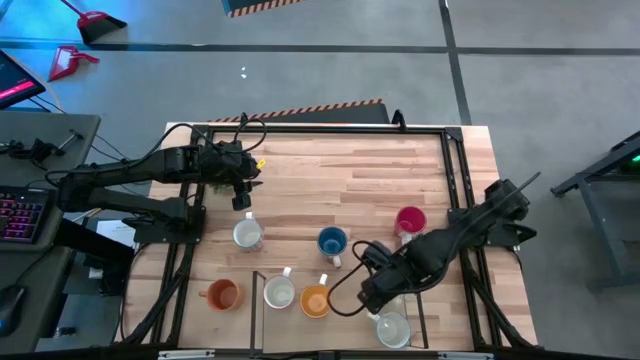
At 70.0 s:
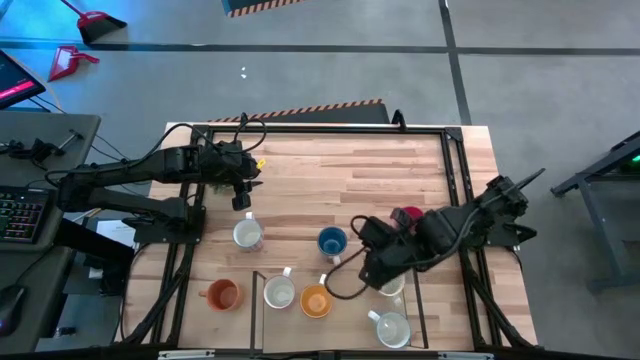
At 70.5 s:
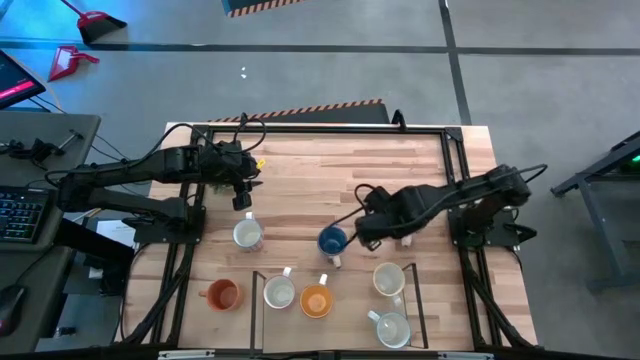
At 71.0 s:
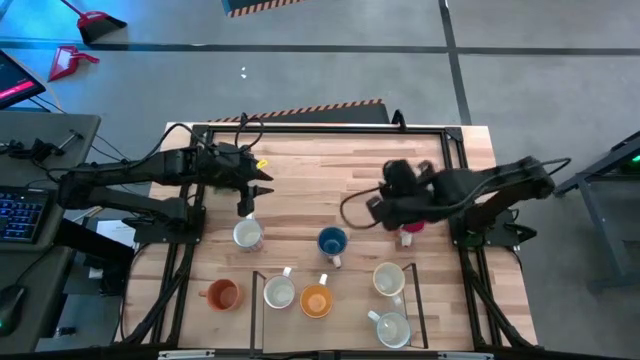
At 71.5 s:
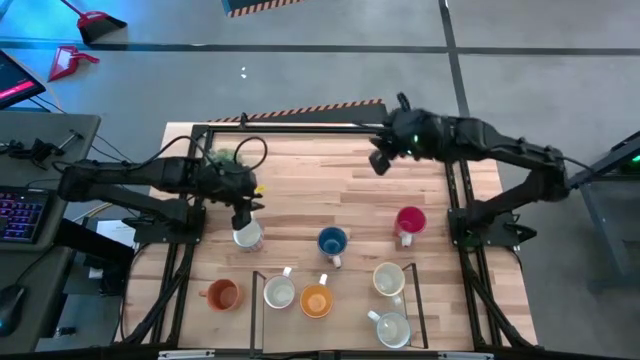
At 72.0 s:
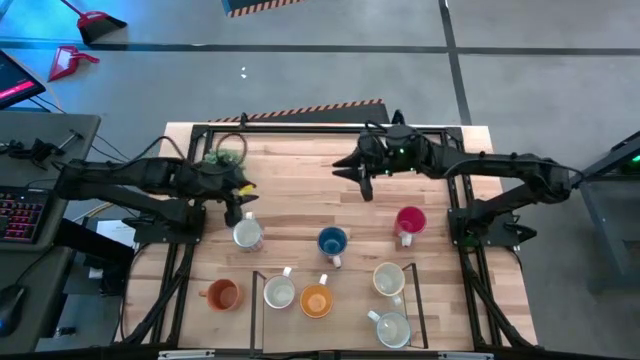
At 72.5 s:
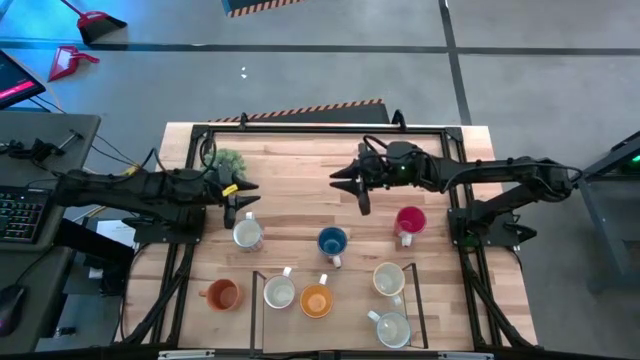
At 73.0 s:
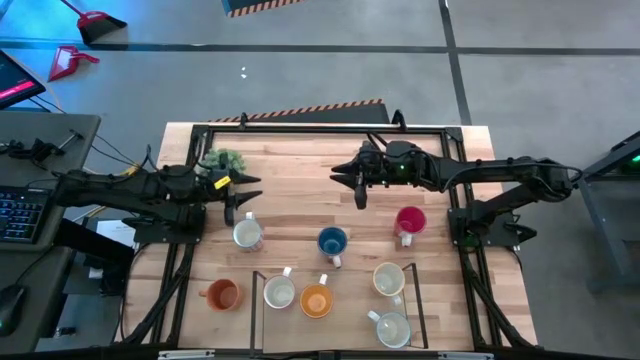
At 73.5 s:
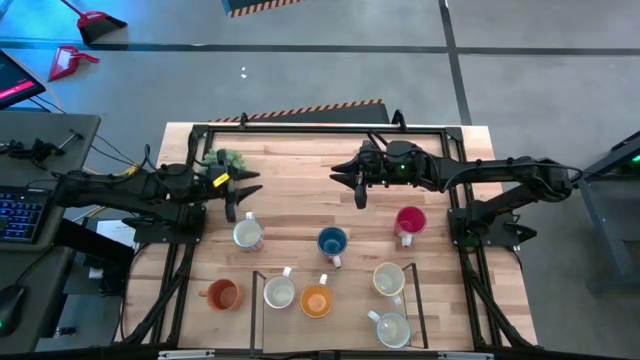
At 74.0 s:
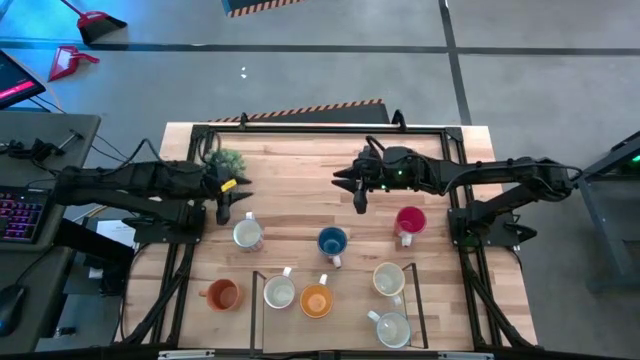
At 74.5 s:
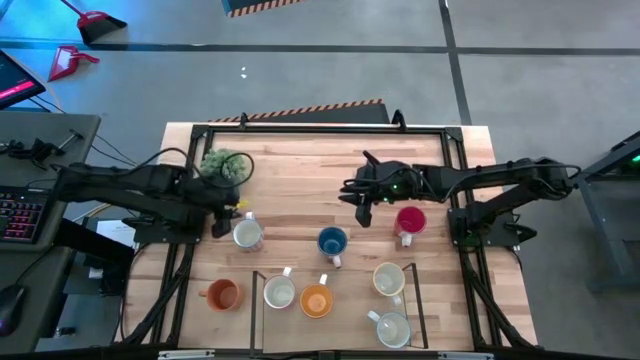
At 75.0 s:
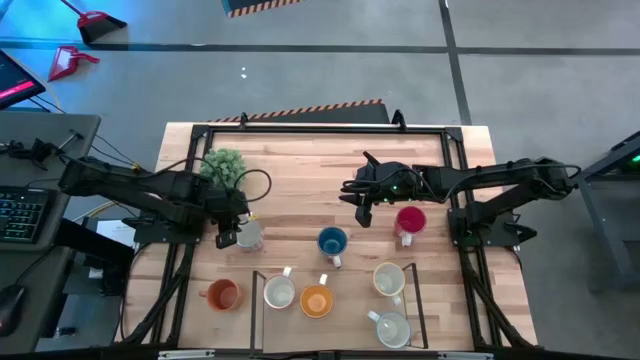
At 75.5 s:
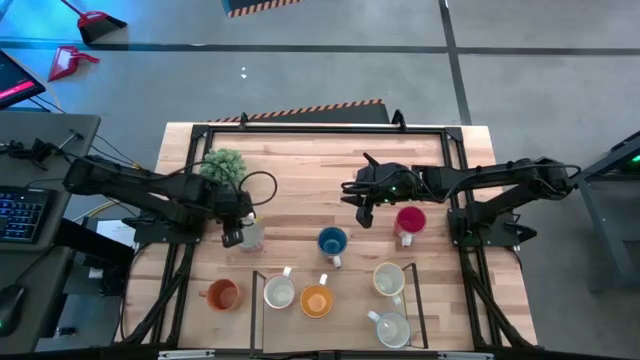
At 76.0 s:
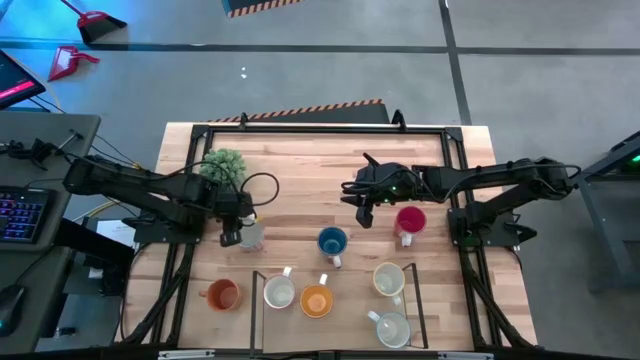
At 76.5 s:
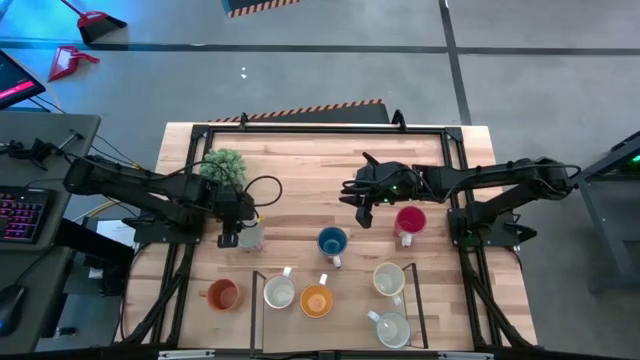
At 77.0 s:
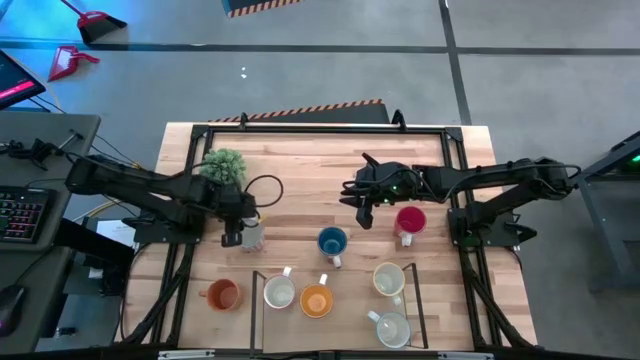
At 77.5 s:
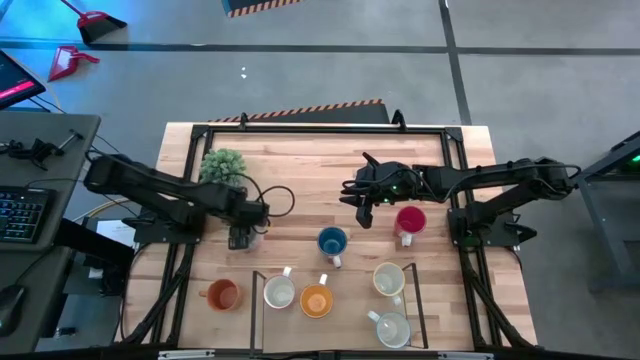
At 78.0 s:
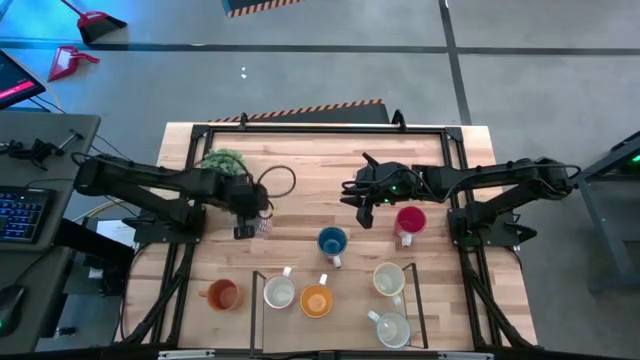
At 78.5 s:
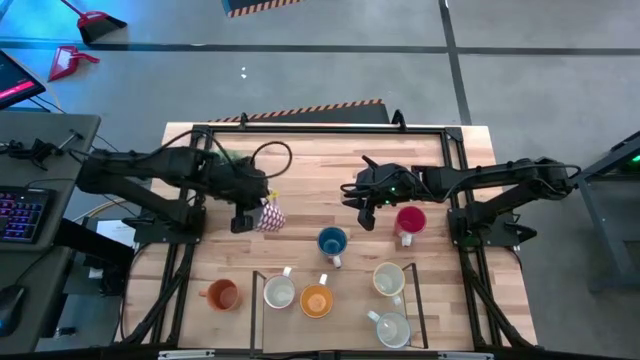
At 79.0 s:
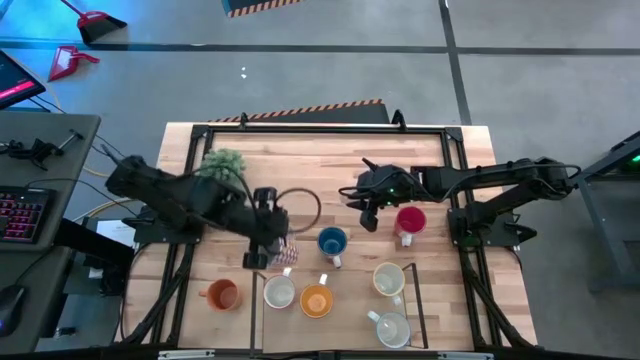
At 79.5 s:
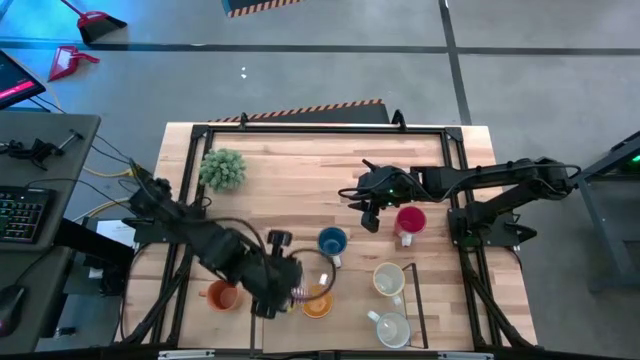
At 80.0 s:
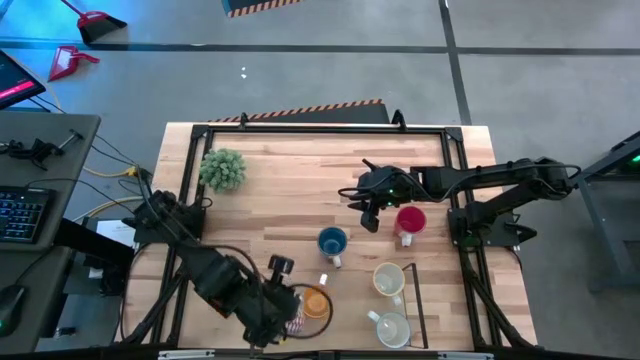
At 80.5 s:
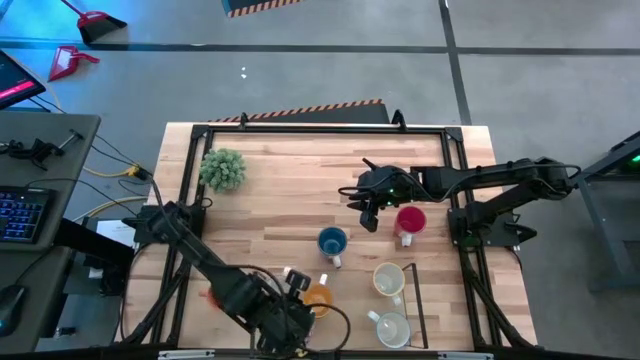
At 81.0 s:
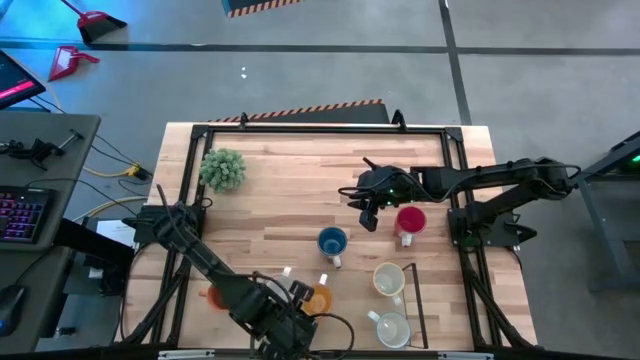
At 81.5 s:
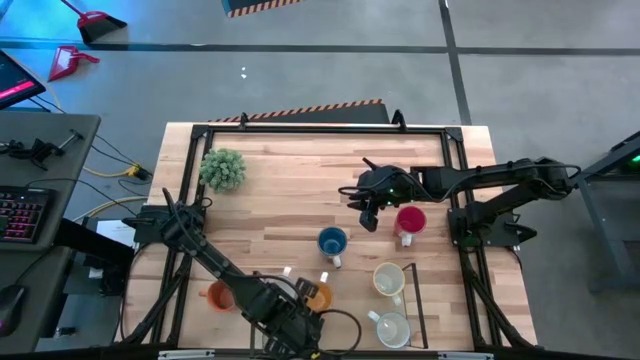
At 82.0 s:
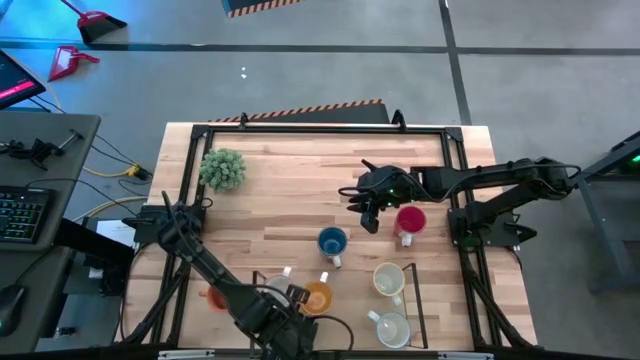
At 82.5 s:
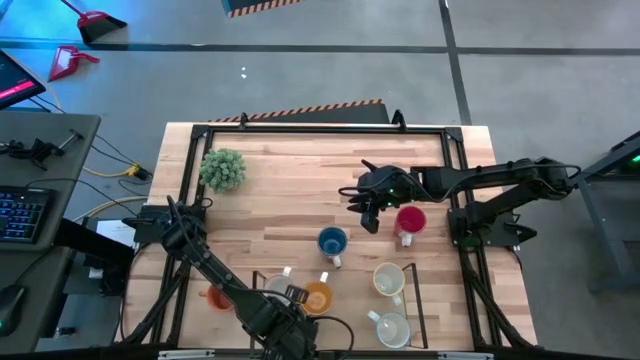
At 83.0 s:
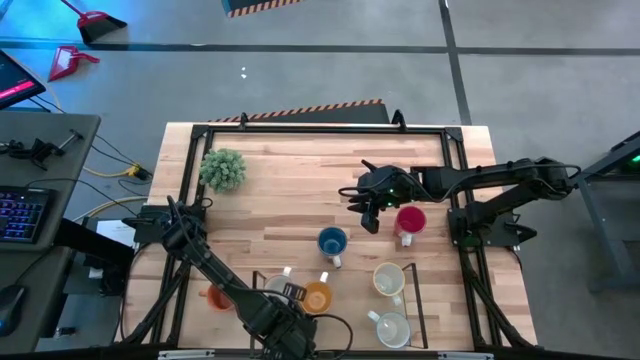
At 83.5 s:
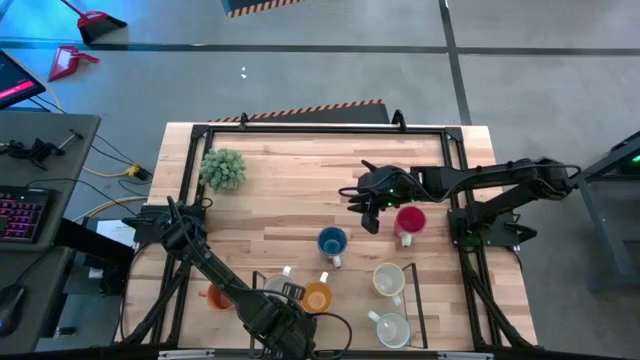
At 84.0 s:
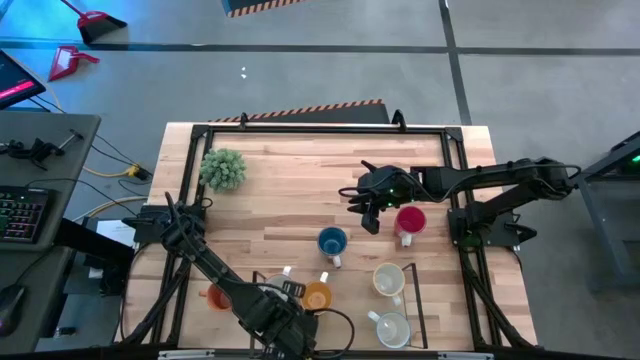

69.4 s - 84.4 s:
Task: Place coffee mugs
Put the red pattern mug on the shelf

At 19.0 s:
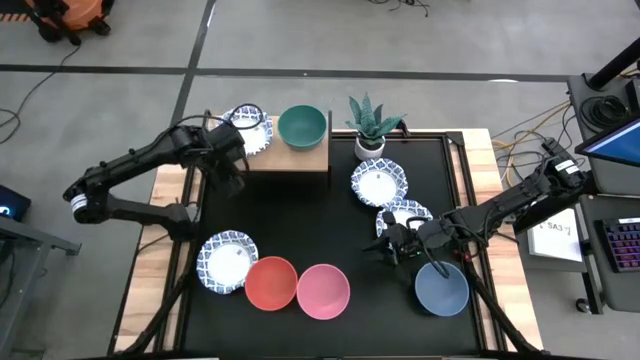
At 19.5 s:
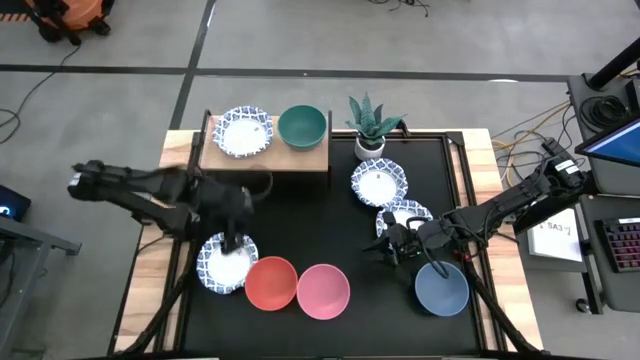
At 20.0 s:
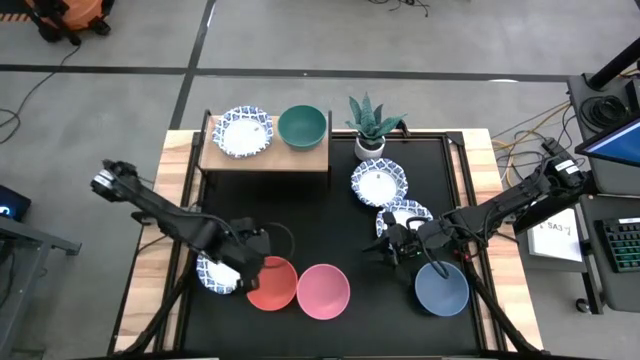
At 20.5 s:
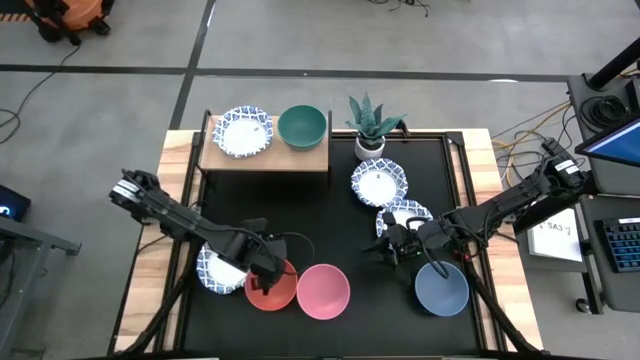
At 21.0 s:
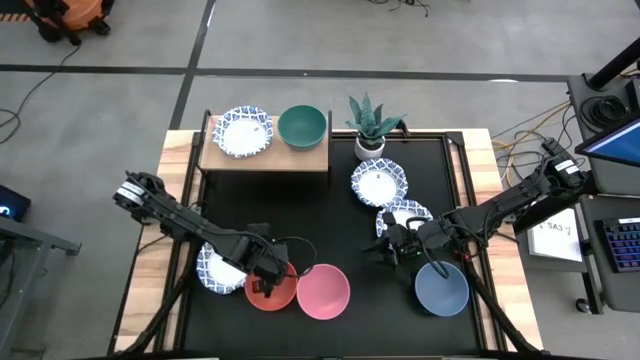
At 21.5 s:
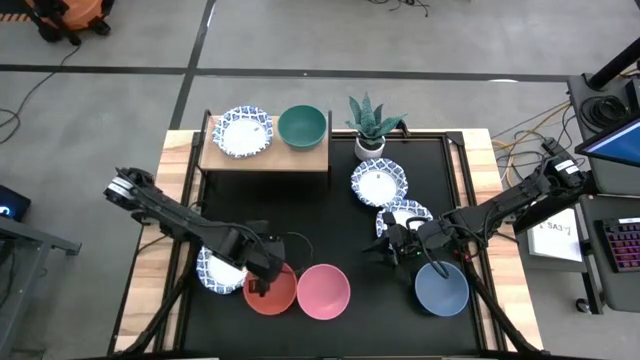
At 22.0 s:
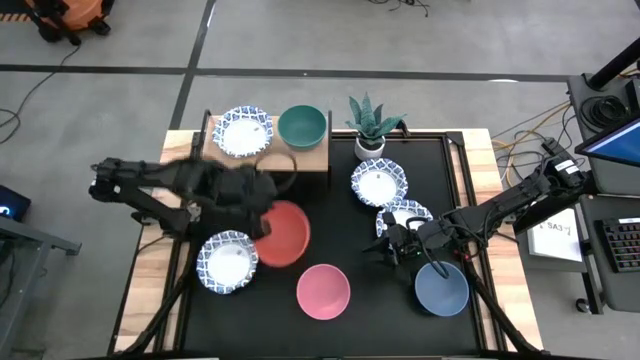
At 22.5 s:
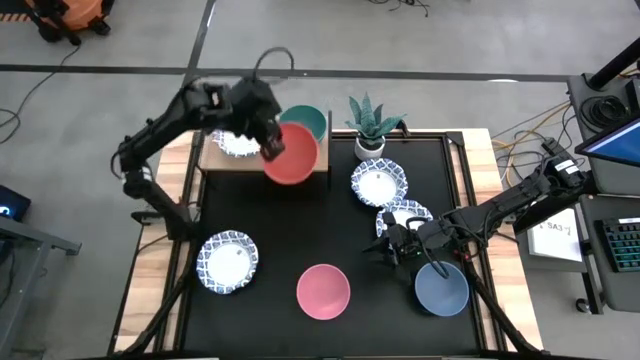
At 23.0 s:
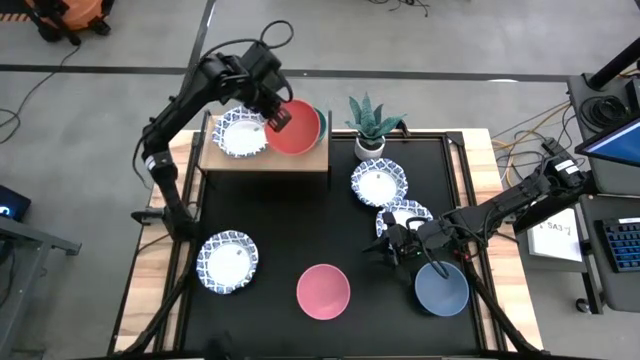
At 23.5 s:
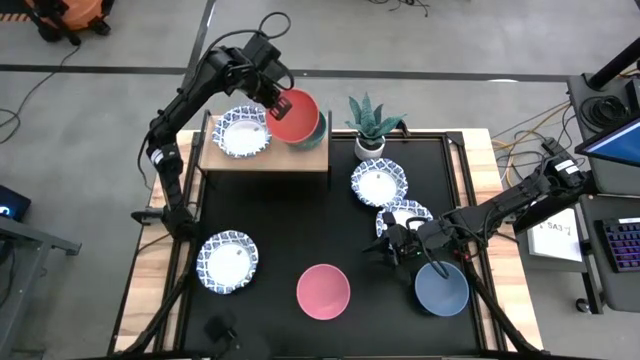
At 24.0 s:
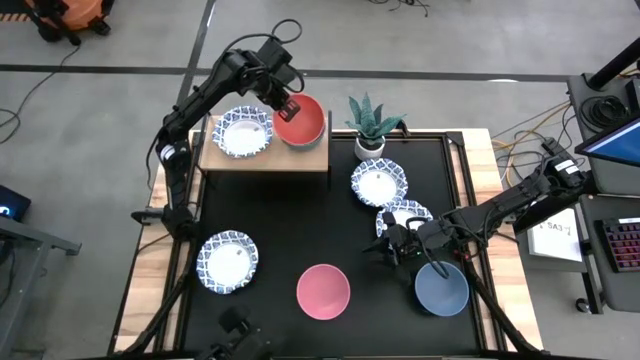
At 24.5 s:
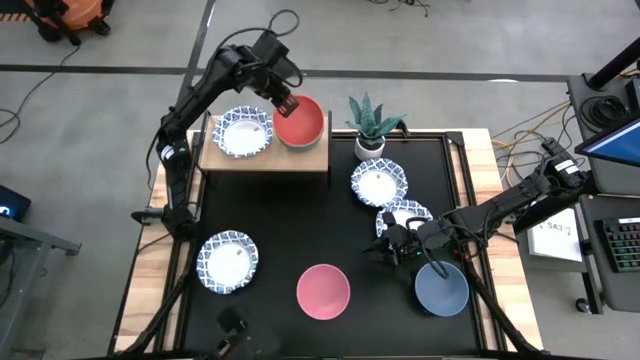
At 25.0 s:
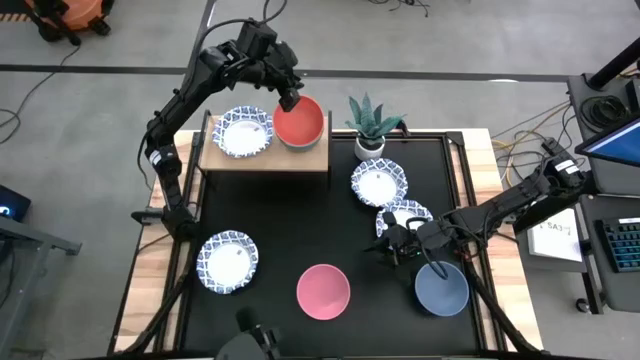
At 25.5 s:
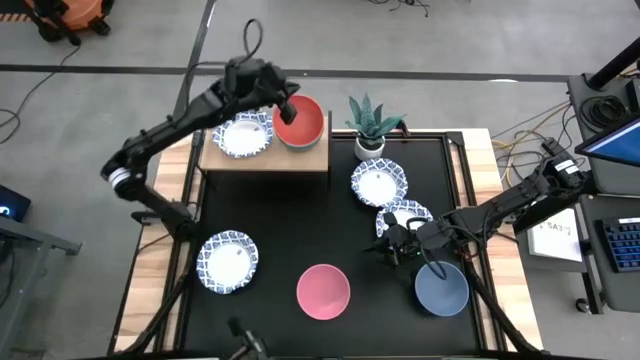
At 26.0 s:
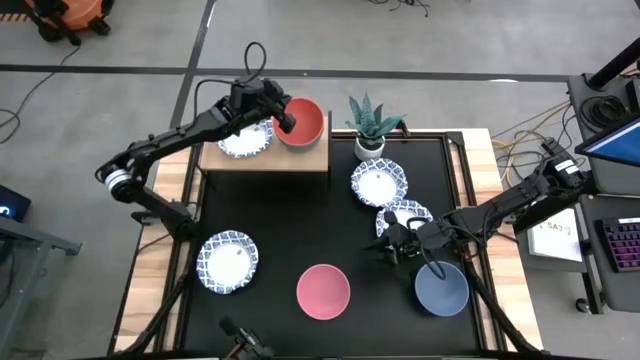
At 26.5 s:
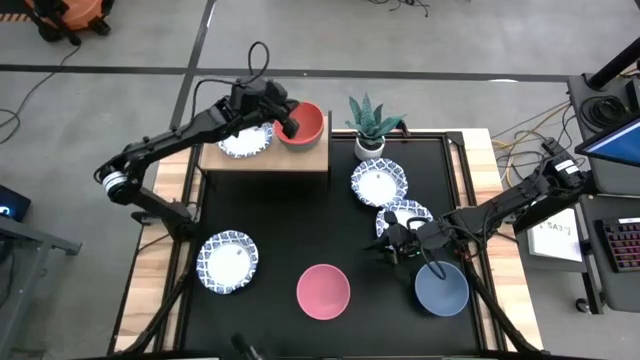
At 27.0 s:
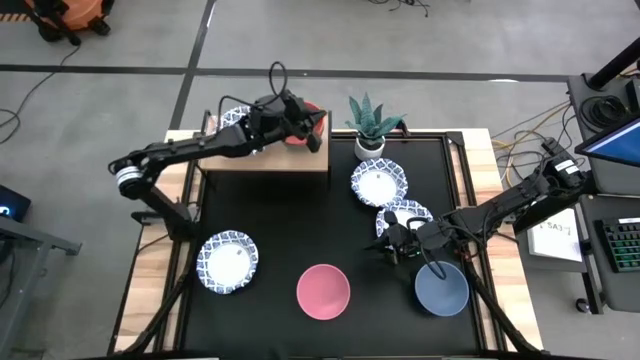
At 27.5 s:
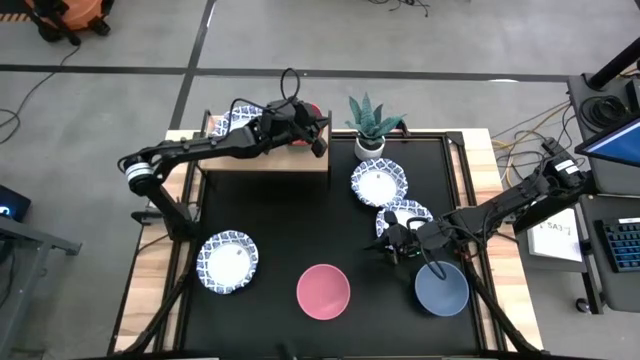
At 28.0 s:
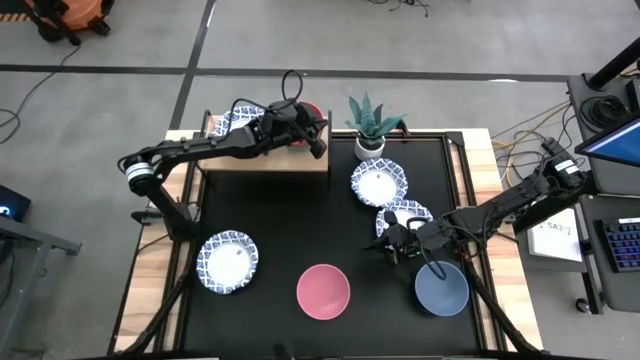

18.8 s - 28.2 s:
Task: Place and stack bowls onto a shelf
Stack the red bowl on top of the green bowl on the shelf
